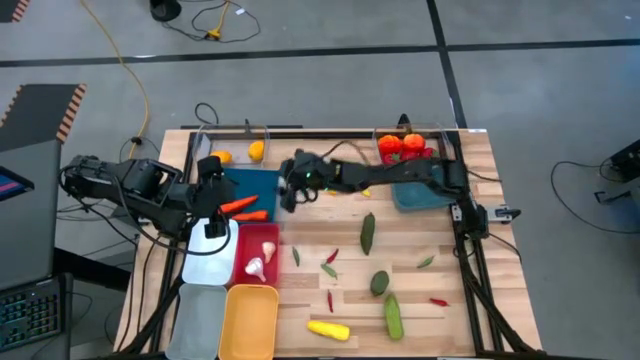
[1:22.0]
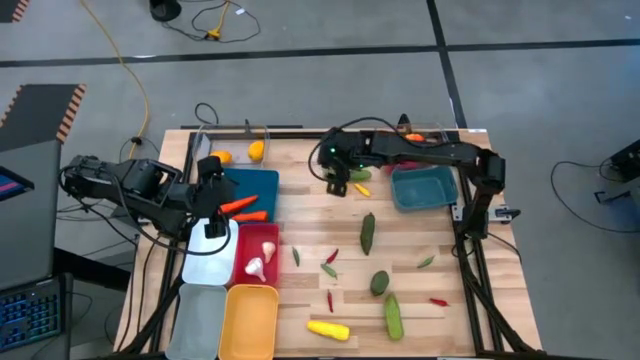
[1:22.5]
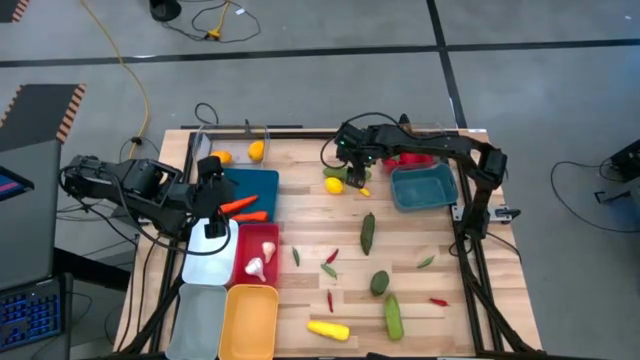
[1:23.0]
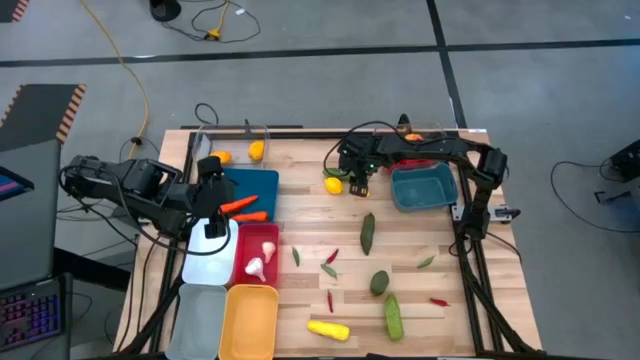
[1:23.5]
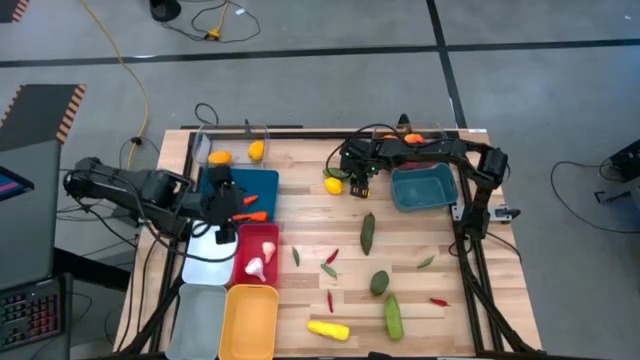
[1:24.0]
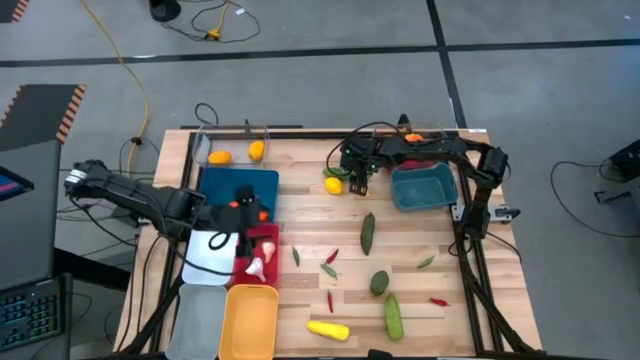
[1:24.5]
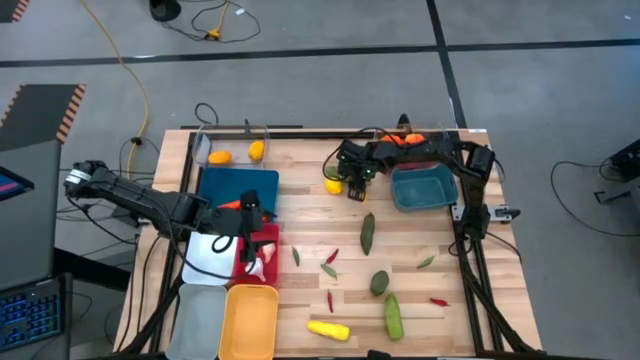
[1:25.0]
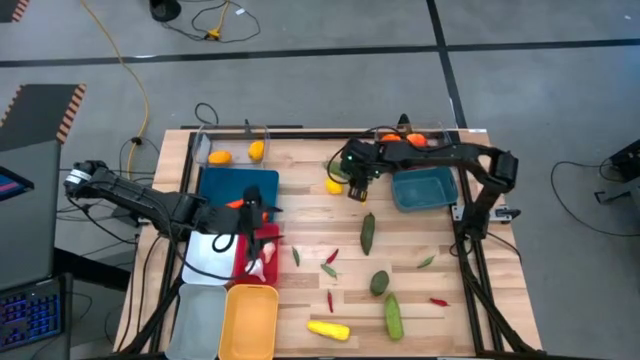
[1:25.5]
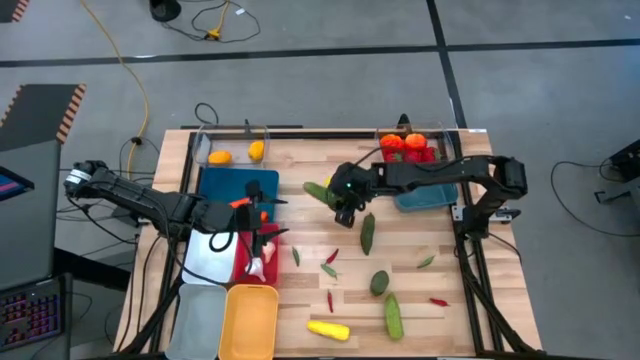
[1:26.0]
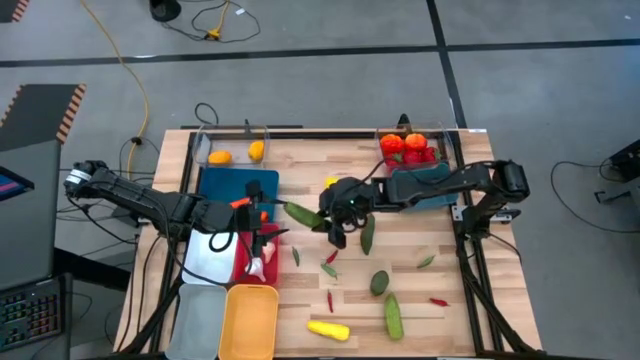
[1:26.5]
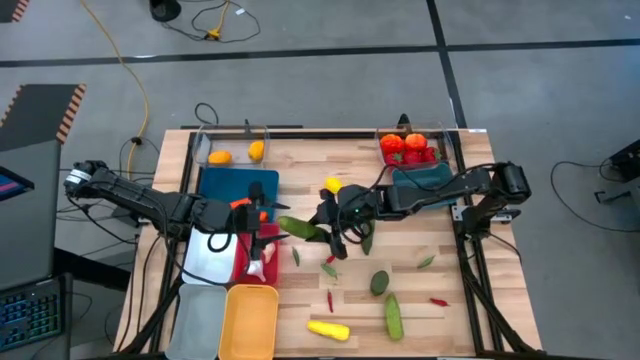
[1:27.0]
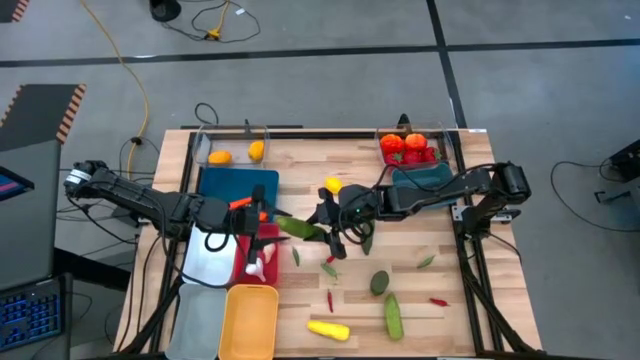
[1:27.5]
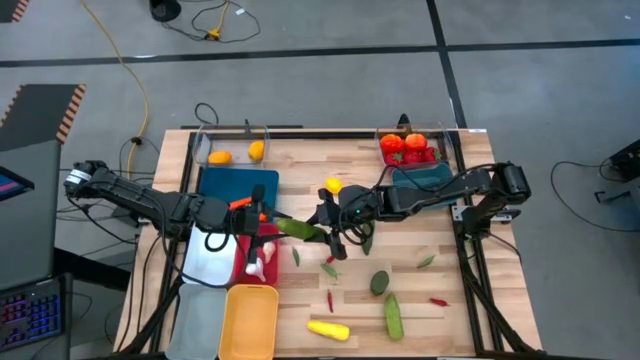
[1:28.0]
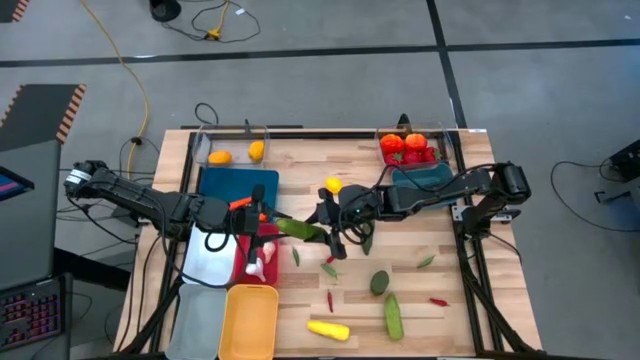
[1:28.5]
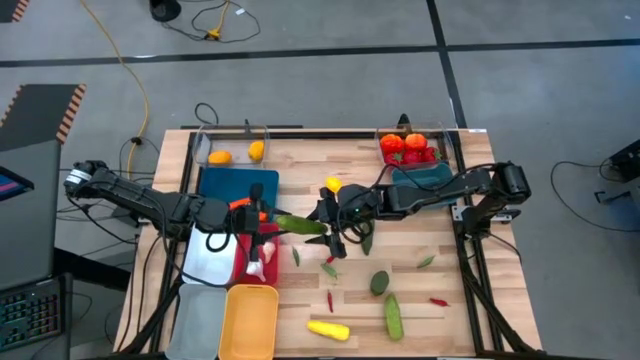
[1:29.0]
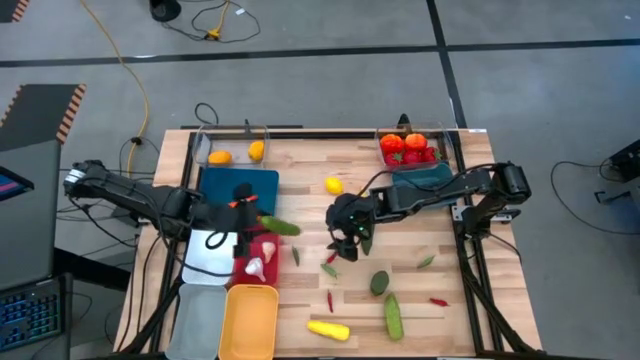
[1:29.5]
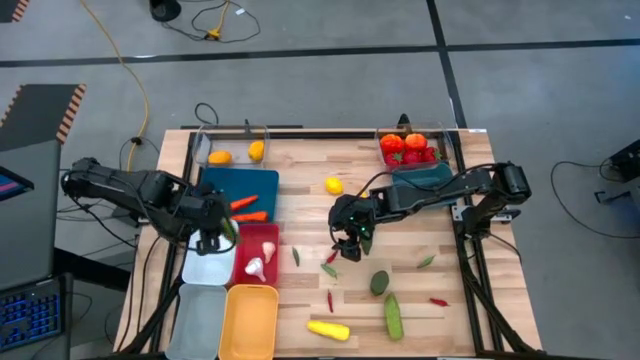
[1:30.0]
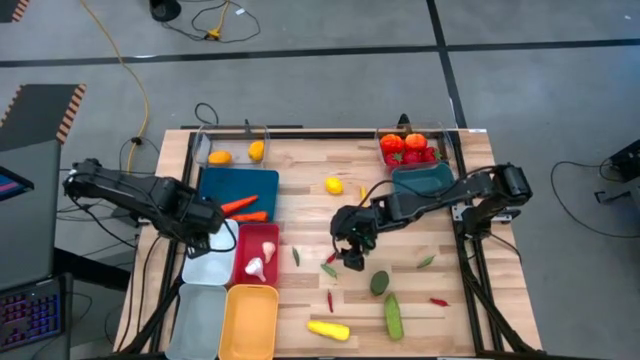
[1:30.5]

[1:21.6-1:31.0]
Task: Sort produce into baskets
Put the top green cucumber into the white bin

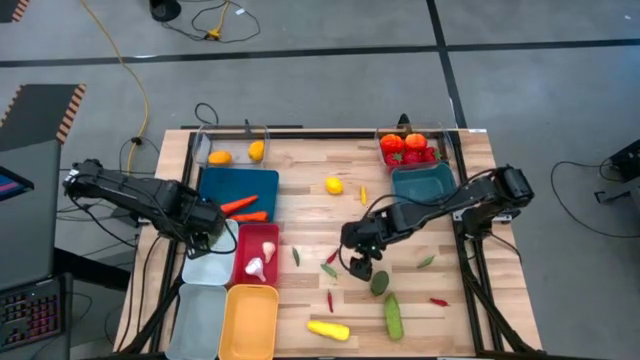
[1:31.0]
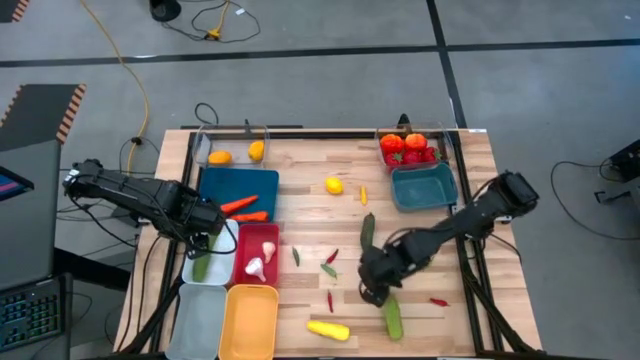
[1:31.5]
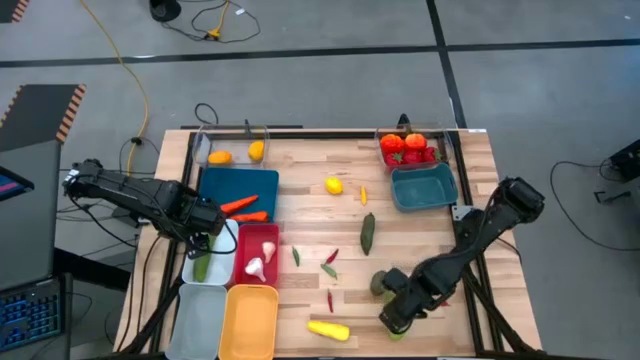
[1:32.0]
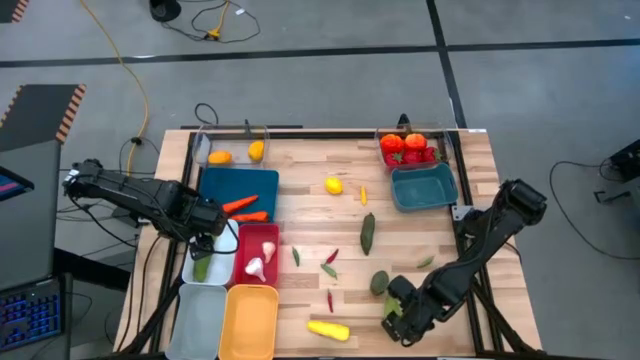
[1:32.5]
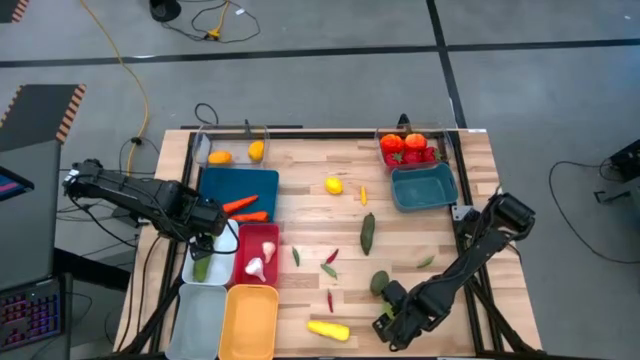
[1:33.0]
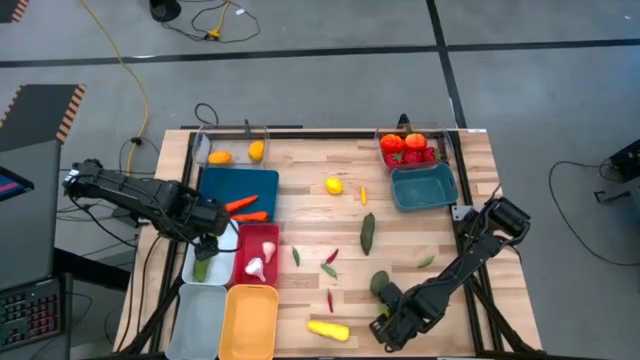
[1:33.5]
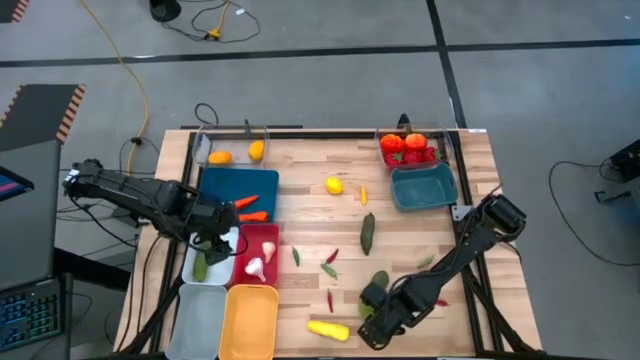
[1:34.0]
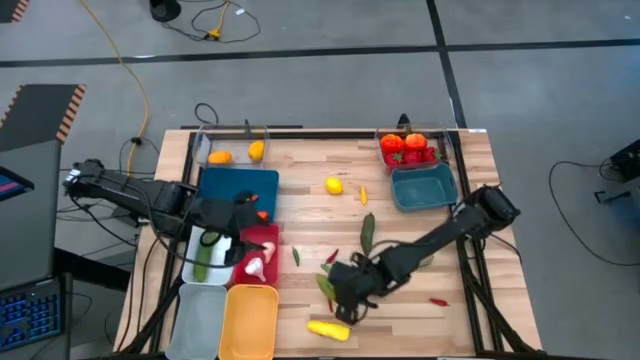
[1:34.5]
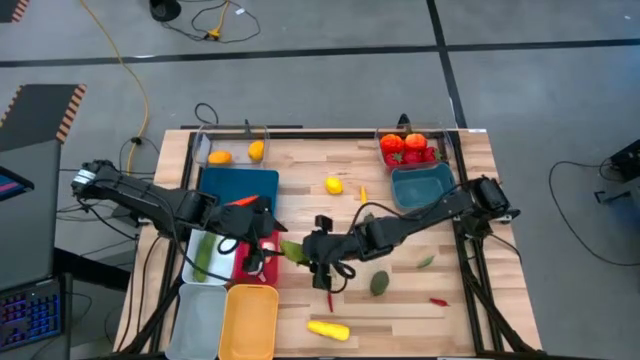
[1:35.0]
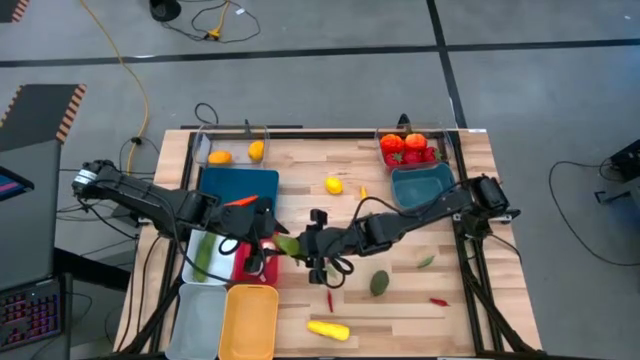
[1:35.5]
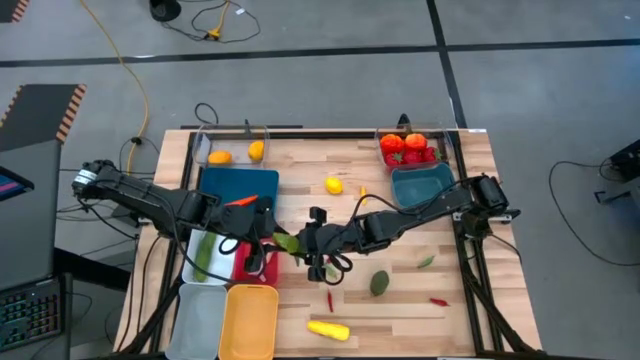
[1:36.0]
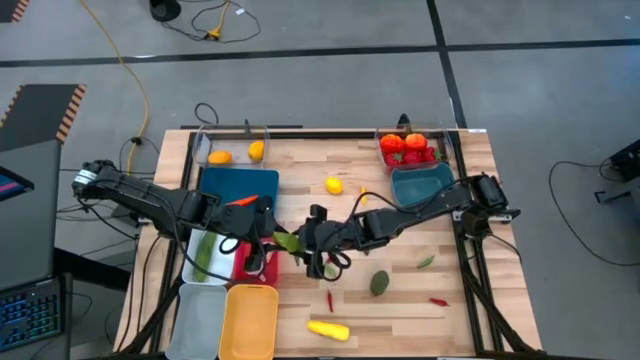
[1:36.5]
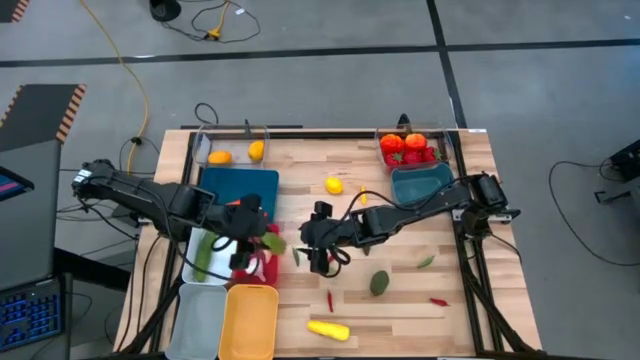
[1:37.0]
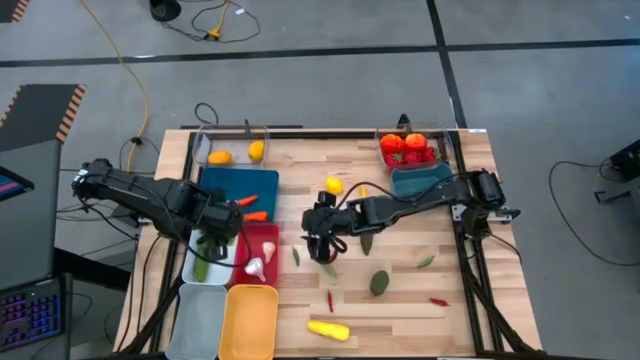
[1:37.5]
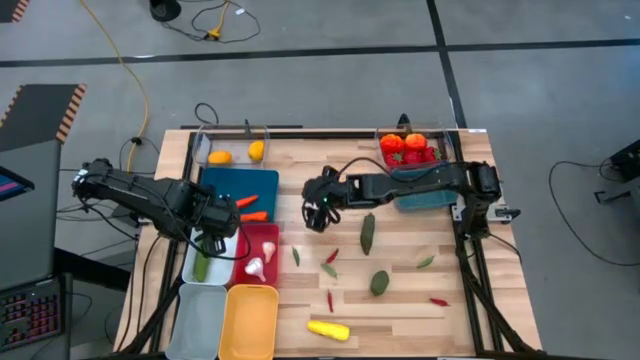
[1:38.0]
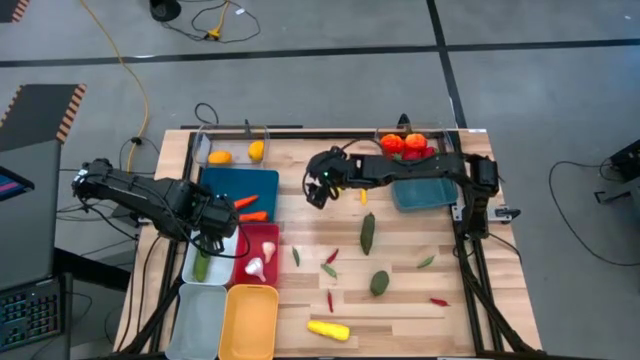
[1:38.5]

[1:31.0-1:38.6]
Put the green cucumber into the white bin

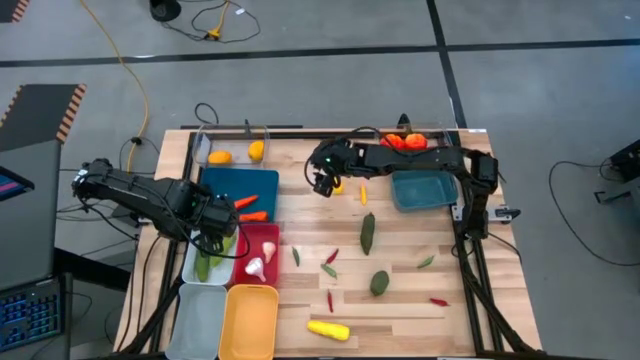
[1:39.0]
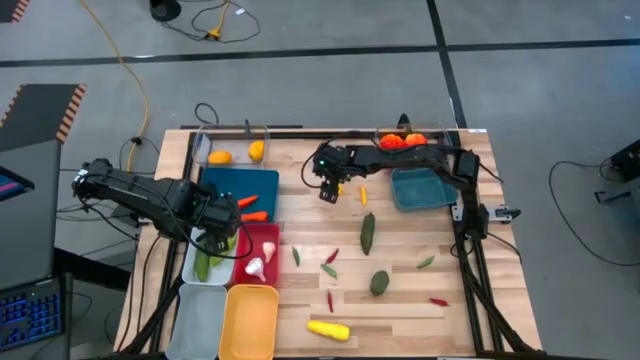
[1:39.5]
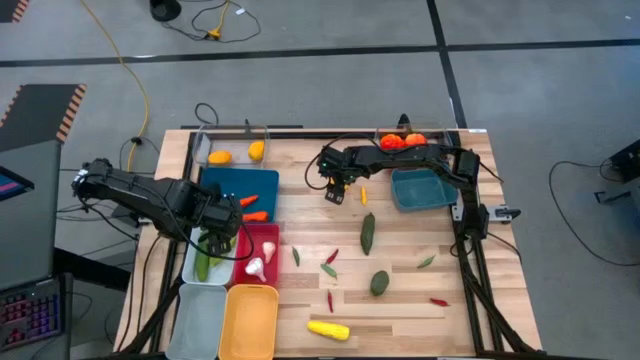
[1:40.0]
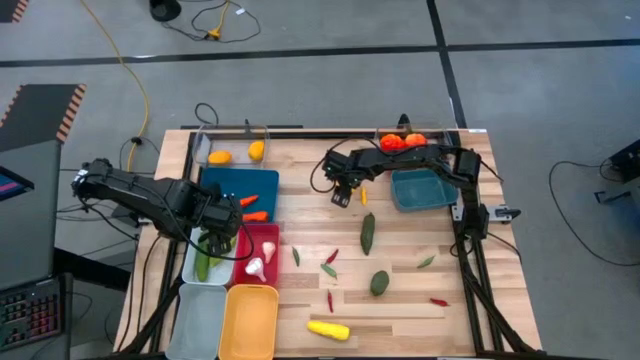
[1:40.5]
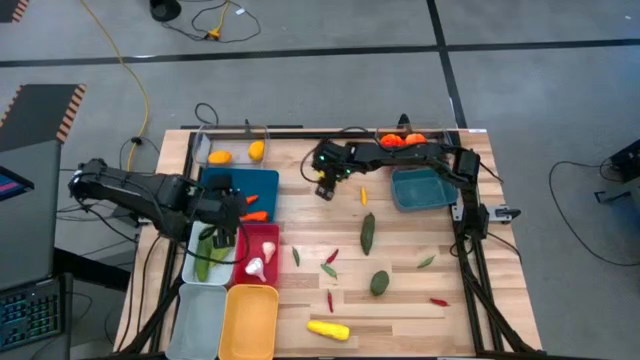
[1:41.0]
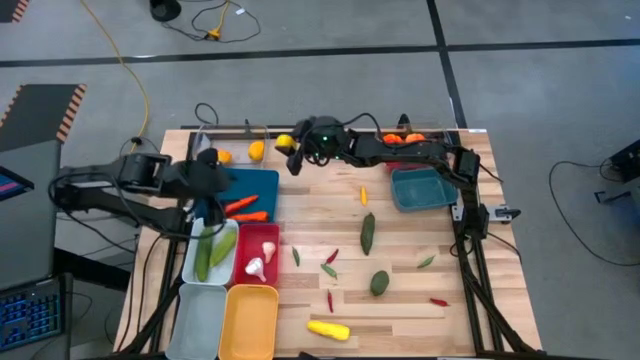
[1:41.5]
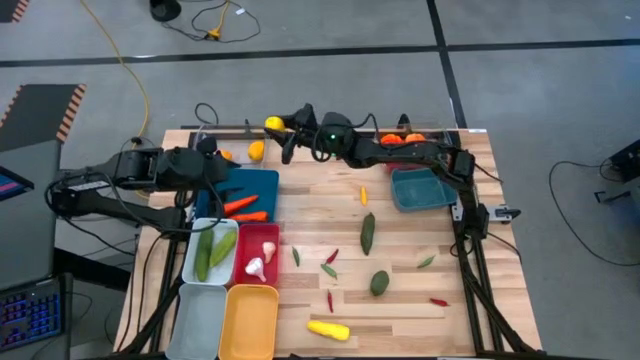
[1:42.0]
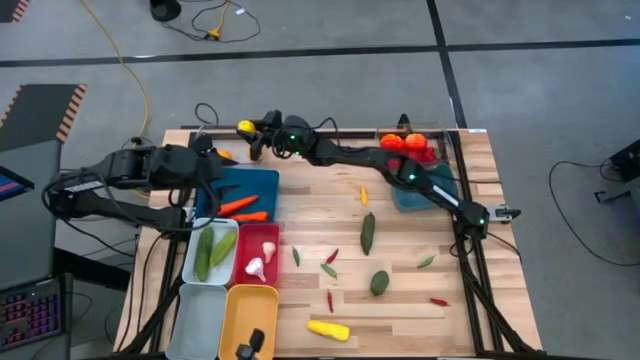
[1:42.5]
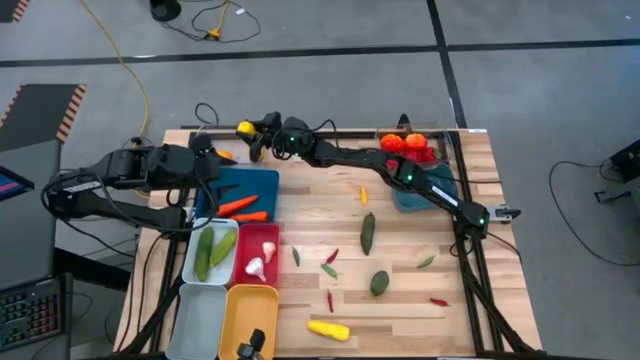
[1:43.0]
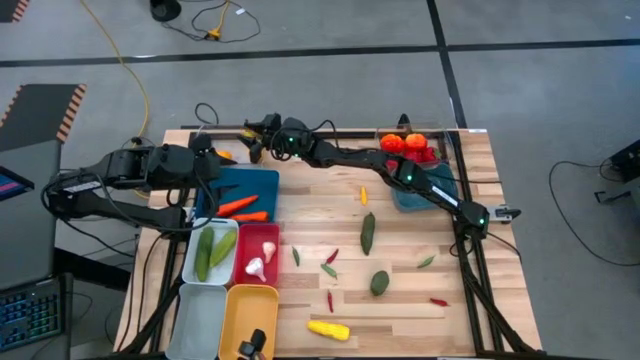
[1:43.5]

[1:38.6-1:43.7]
Put the yellow lemon into the left transparent bin

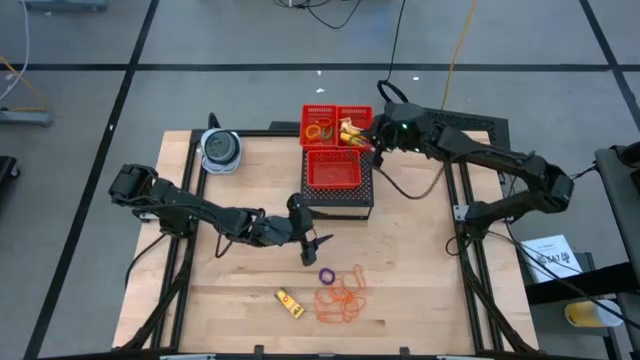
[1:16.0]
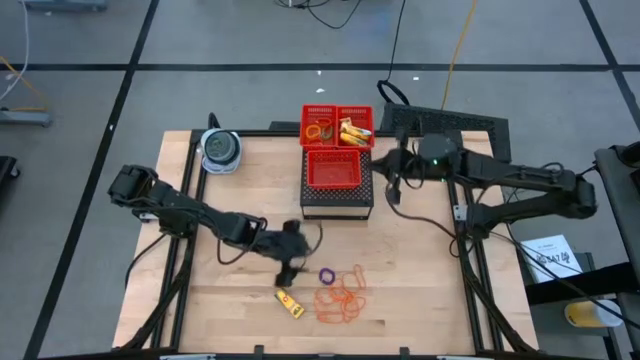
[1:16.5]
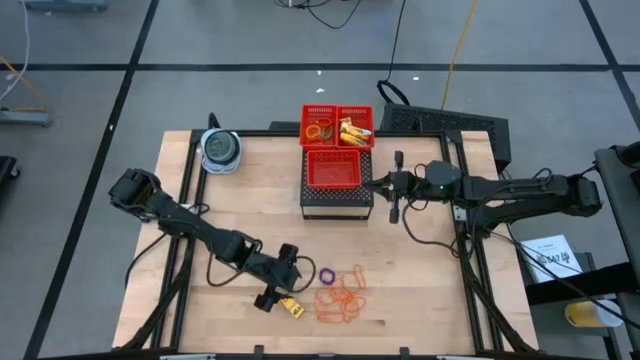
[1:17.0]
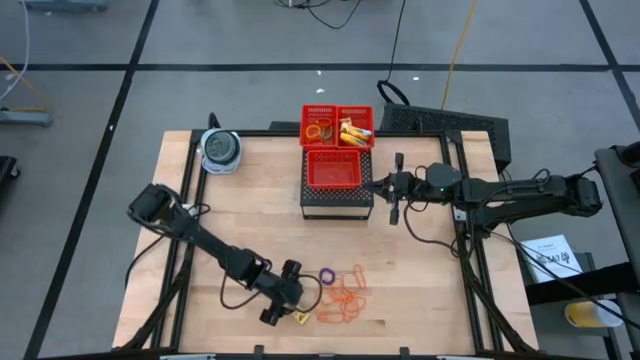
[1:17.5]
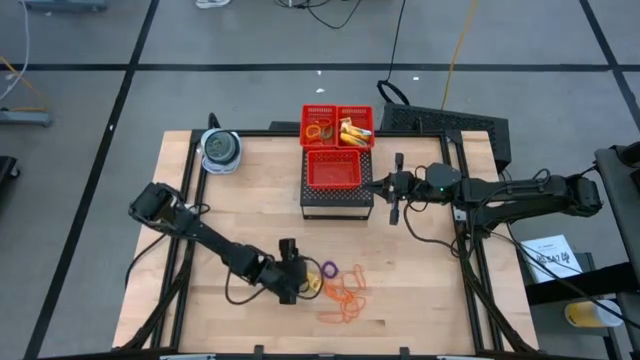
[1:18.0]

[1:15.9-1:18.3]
Task: Pick & Place Office Desk Supplies
Put the yellow pack of crayon in the top right red bin on the shelf
